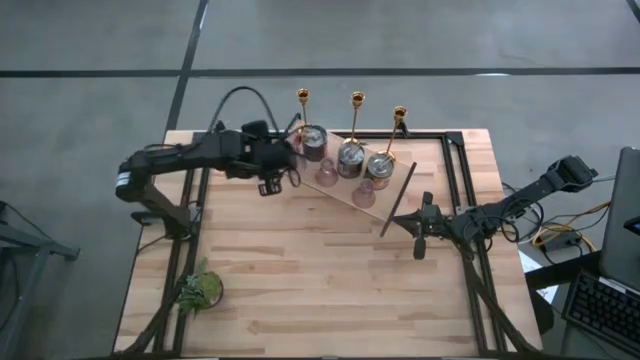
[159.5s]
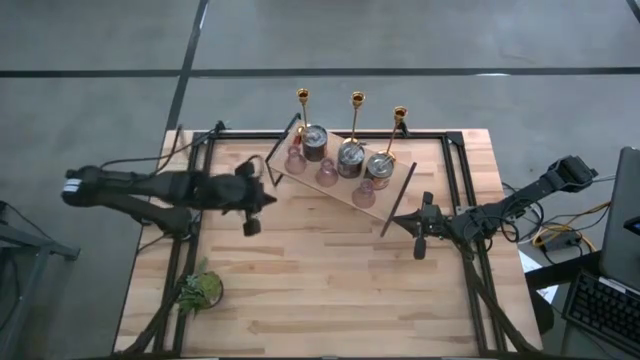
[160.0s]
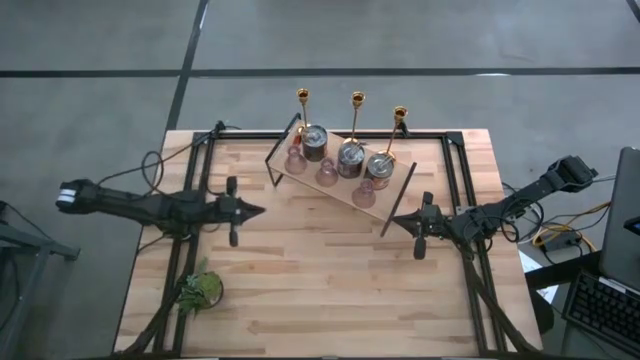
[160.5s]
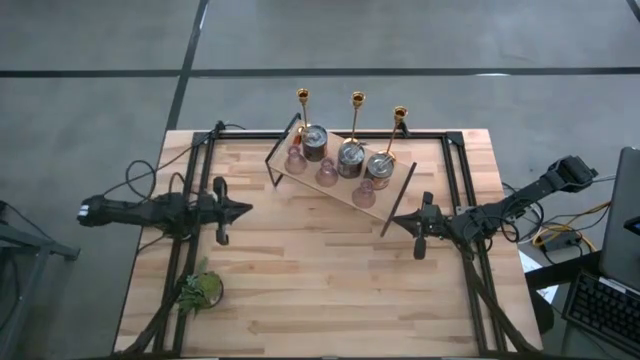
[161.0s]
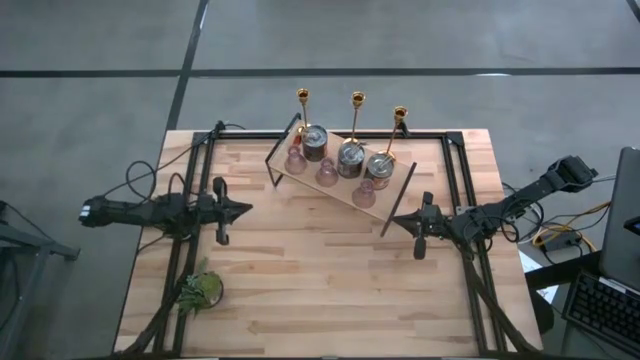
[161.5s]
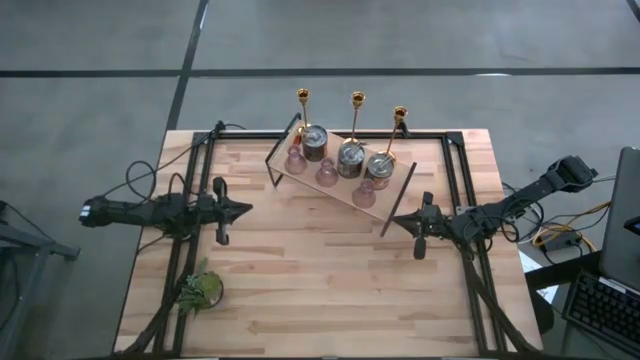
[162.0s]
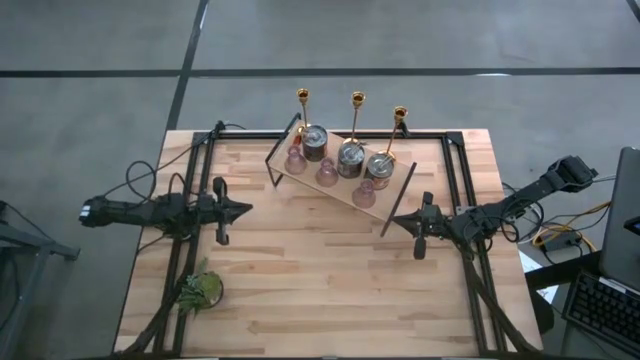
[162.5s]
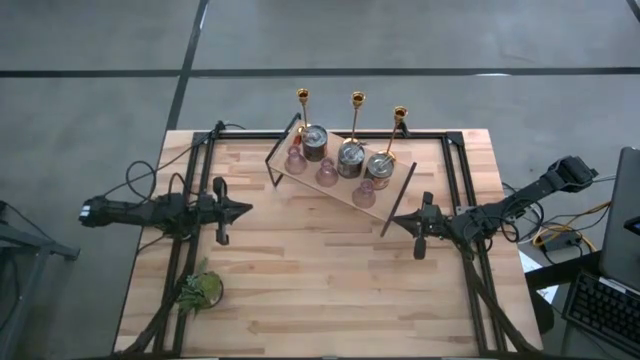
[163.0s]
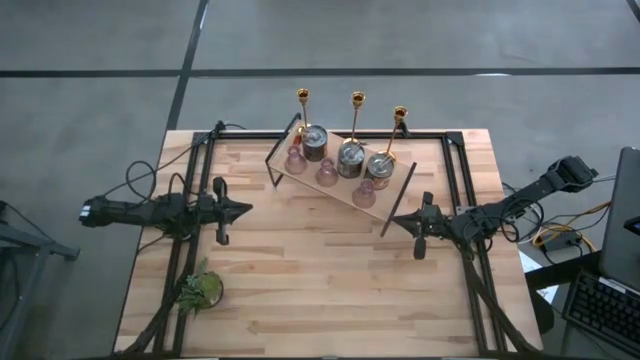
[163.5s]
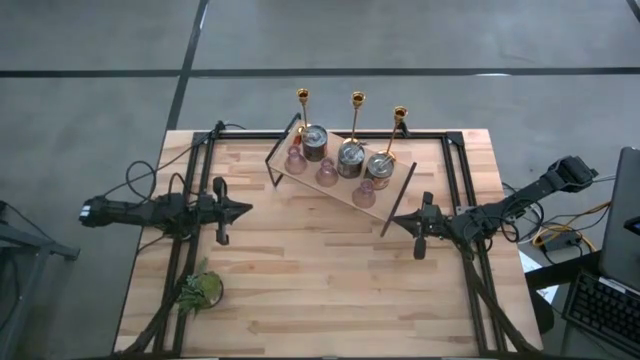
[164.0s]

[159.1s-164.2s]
Task: Pick & Place candle stick holders
Return to Home Position

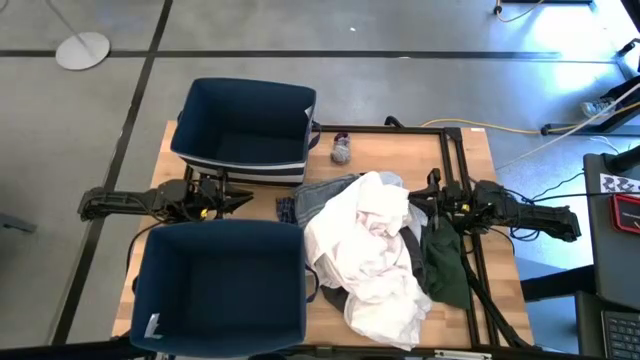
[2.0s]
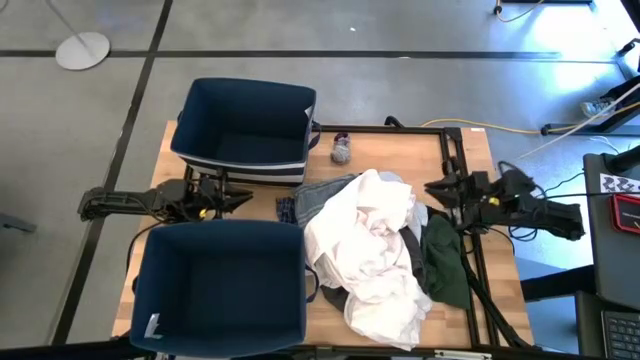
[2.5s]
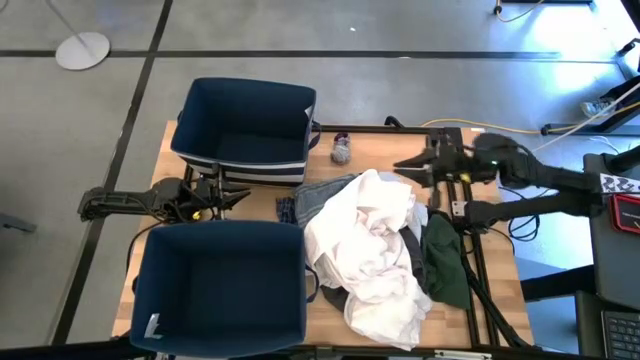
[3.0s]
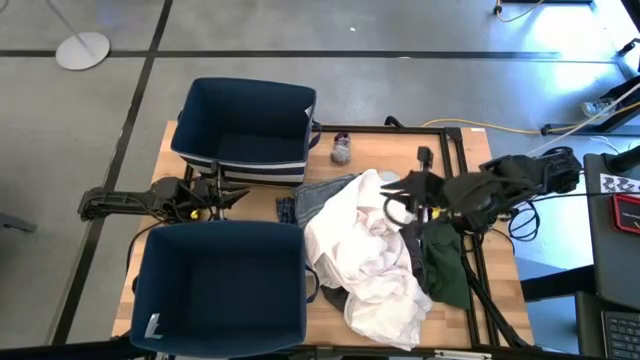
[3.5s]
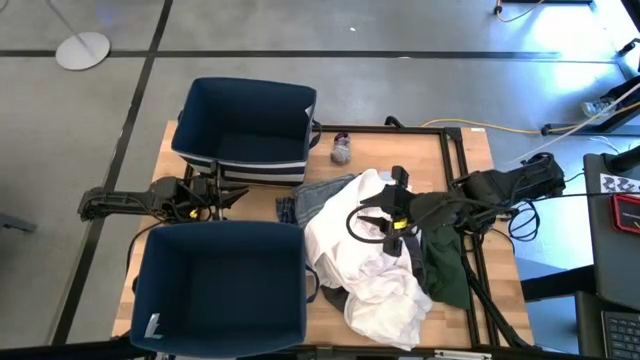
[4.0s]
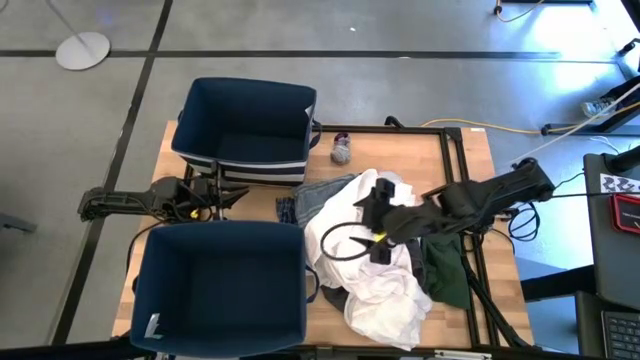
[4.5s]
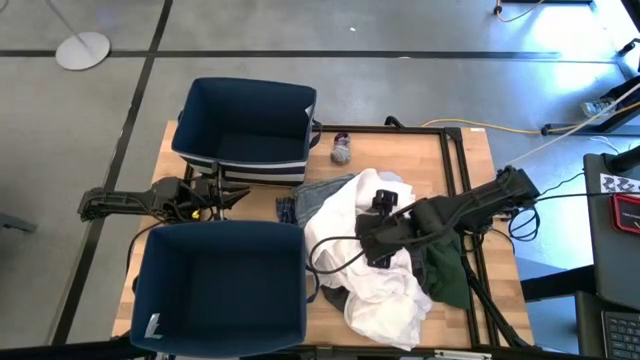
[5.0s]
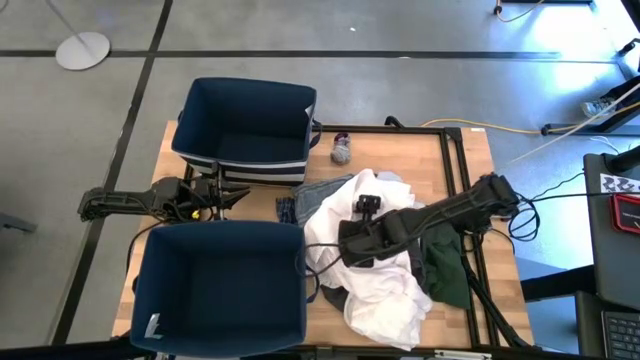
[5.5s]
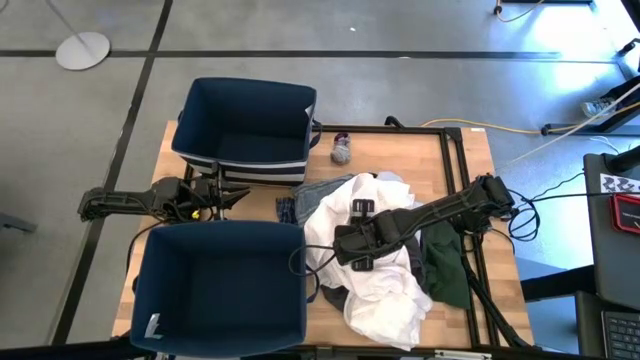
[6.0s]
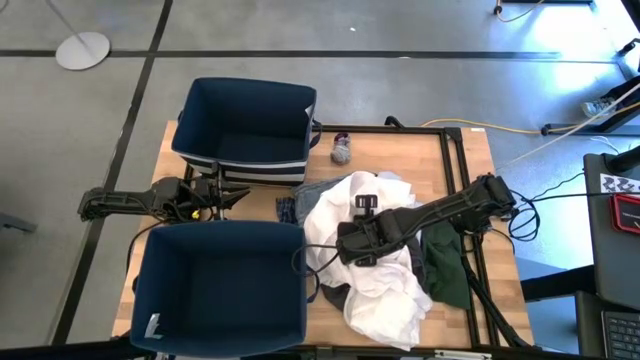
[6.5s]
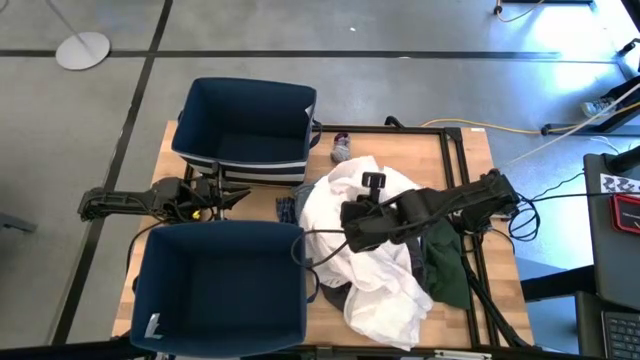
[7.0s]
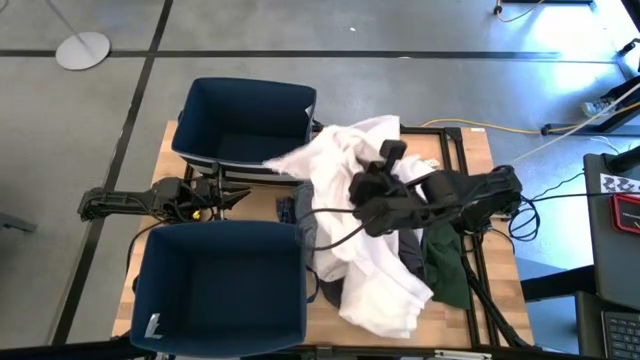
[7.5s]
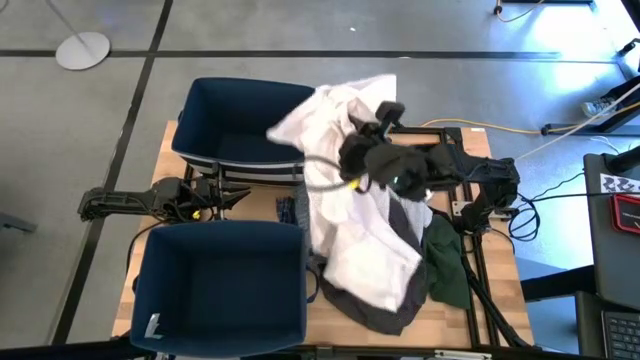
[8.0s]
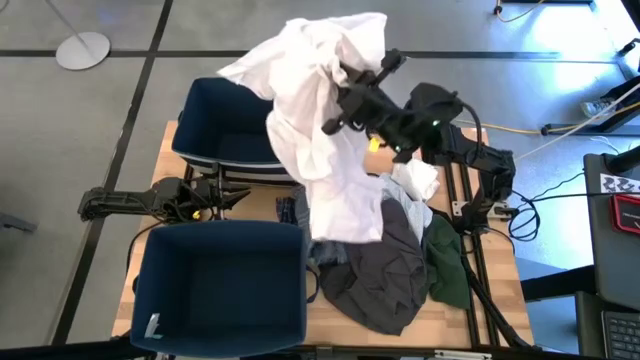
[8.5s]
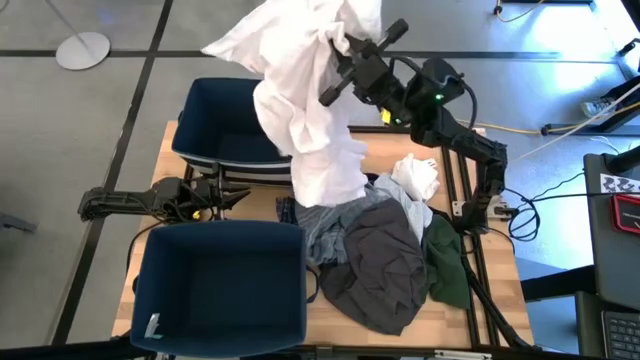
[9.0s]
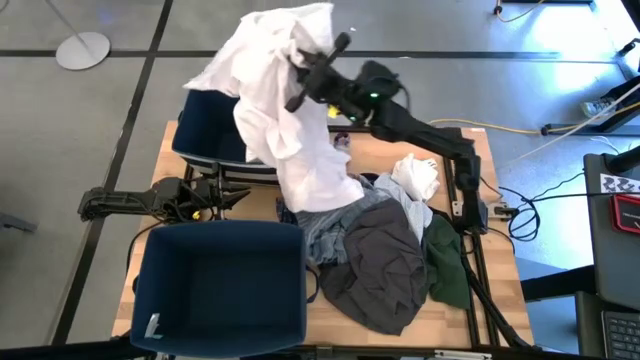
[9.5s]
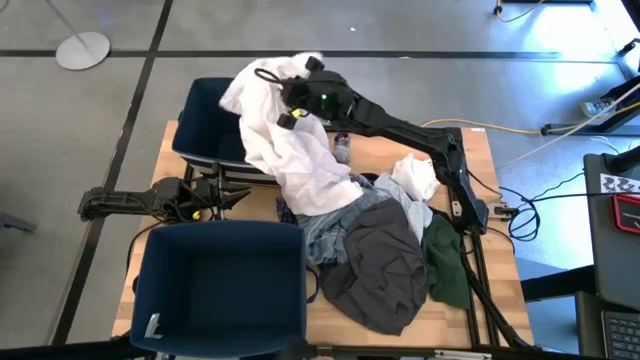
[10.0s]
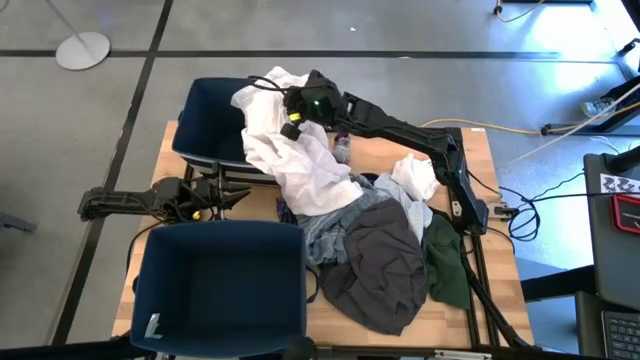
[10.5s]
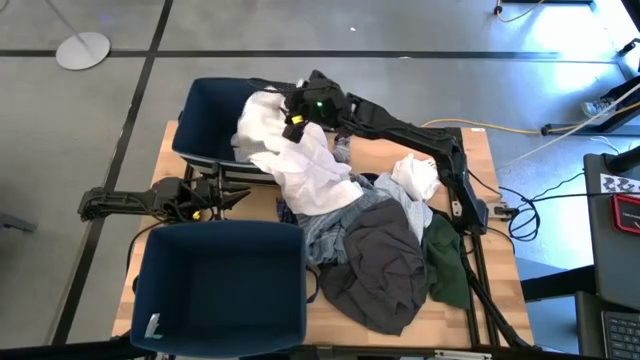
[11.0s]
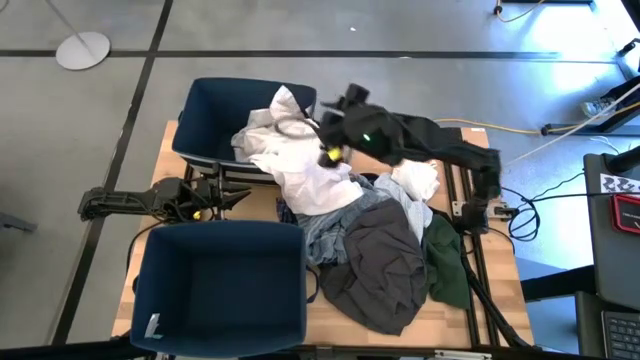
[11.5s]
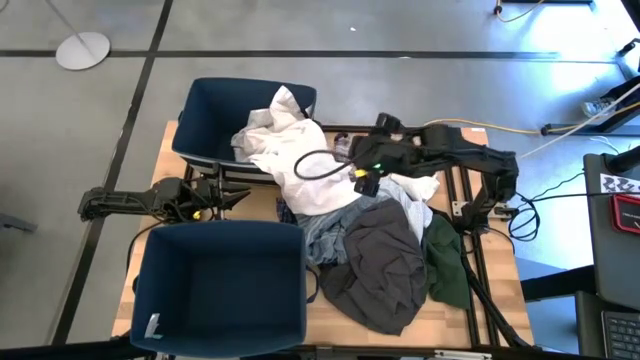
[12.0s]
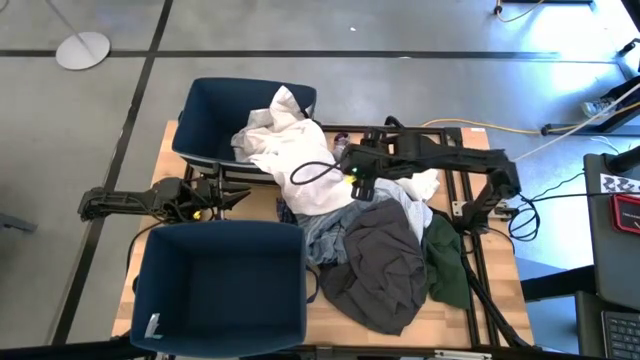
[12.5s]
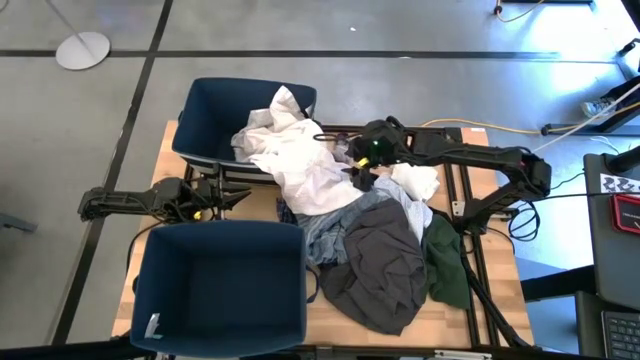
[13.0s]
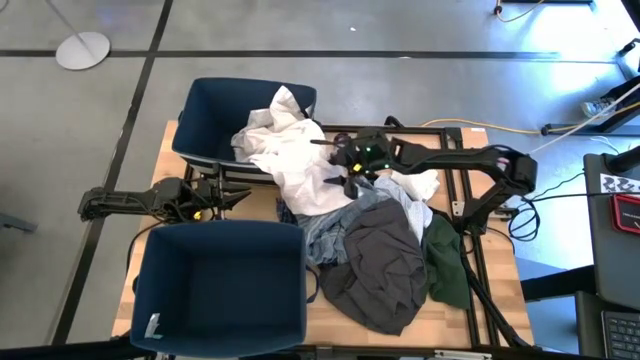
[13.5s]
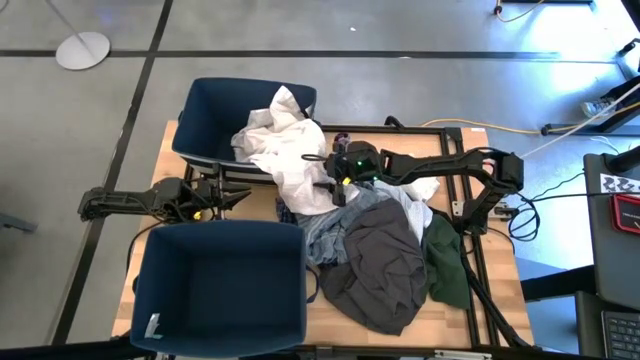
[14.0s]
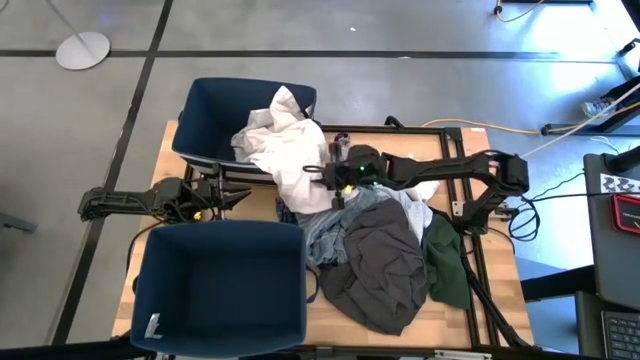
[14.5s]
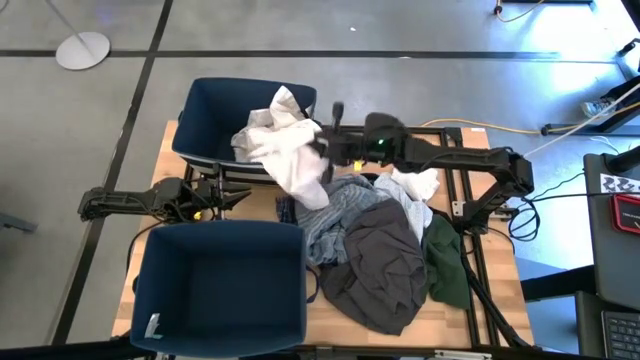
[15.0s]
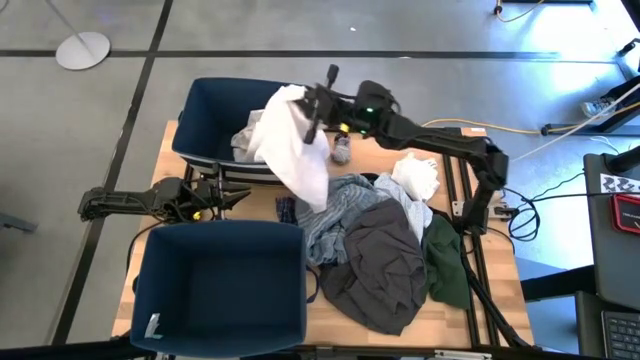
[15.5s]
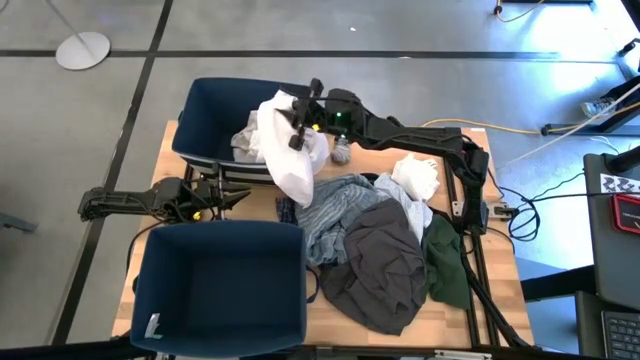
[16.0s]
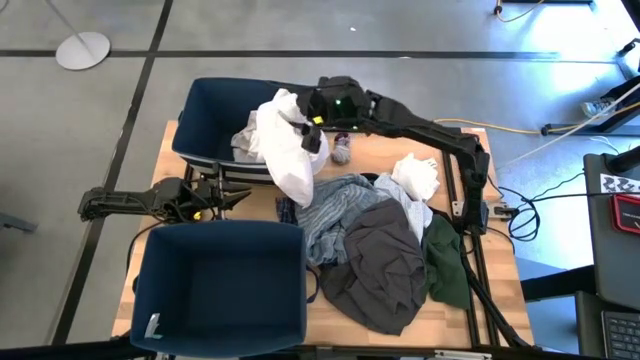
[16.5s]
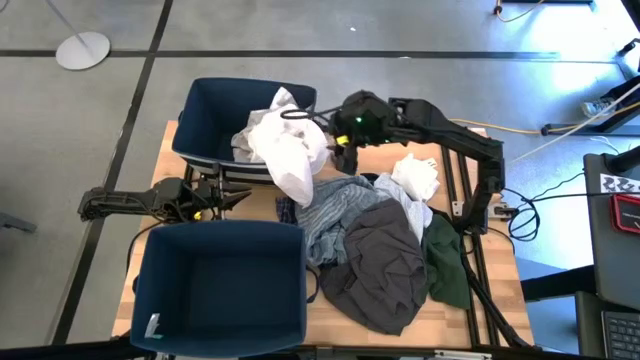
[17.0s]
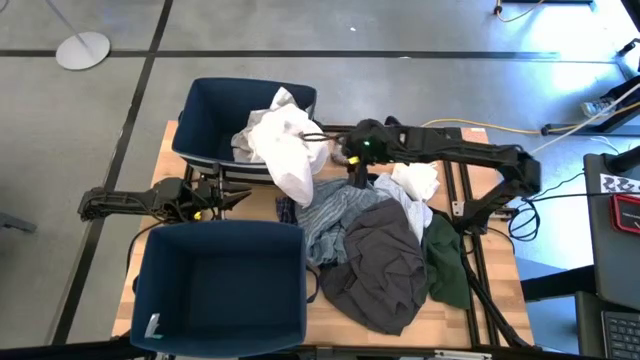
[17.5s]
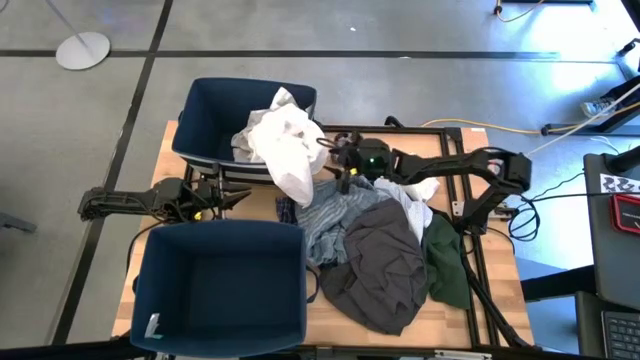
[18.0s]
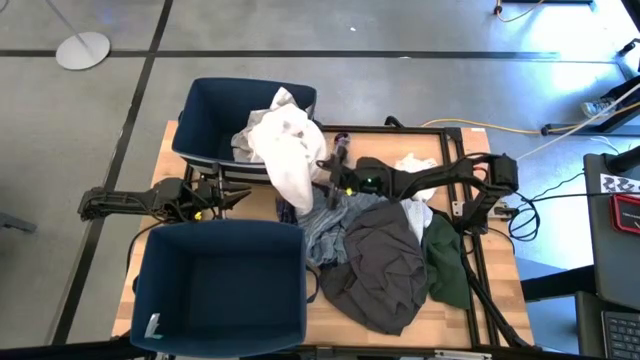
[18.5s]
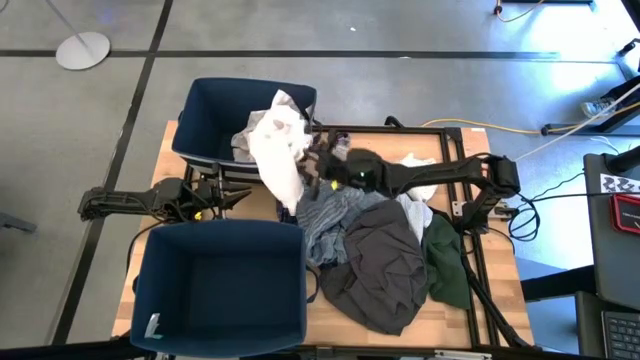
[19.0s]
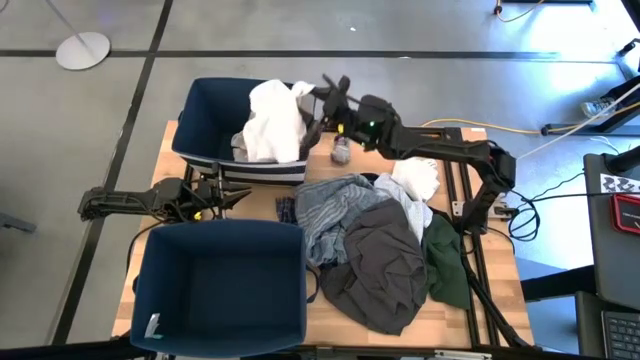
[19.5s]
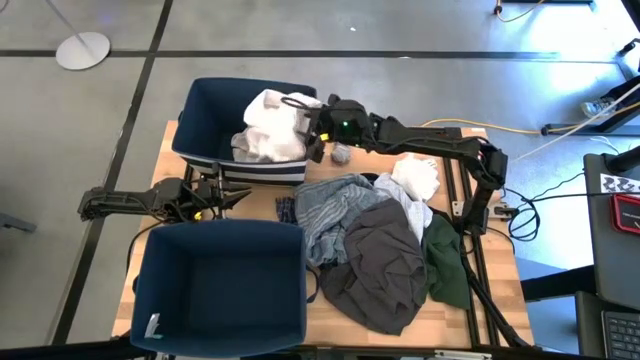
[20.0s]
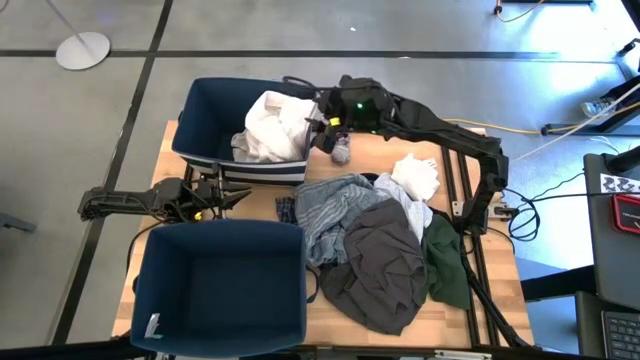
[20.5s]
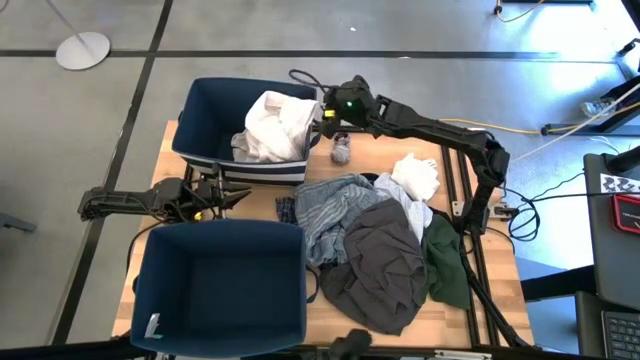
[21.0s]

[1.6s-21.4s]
Task: Sort clothes
Put the white dress into the top blue laundry organizer
